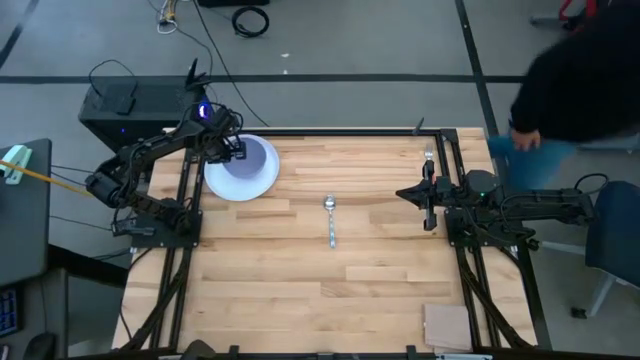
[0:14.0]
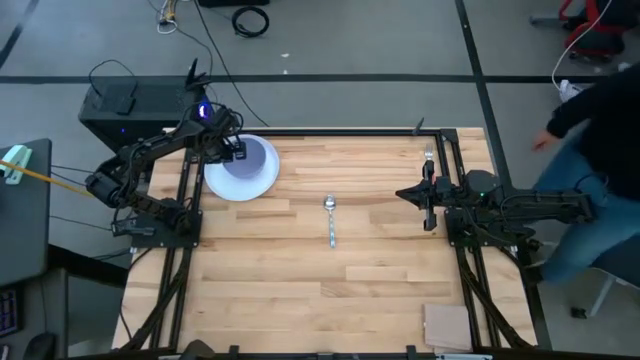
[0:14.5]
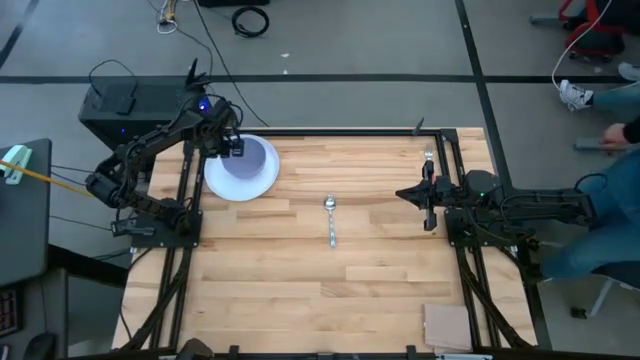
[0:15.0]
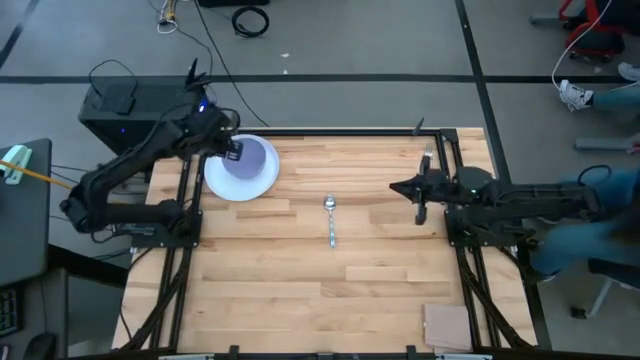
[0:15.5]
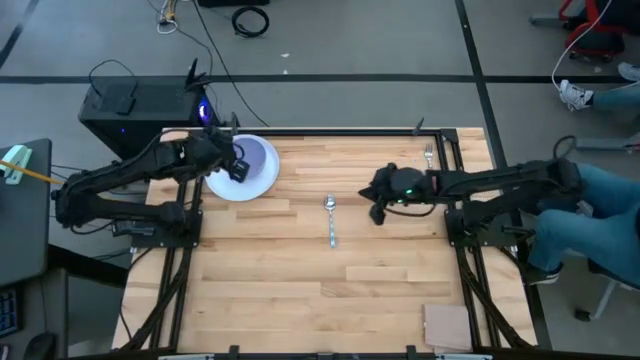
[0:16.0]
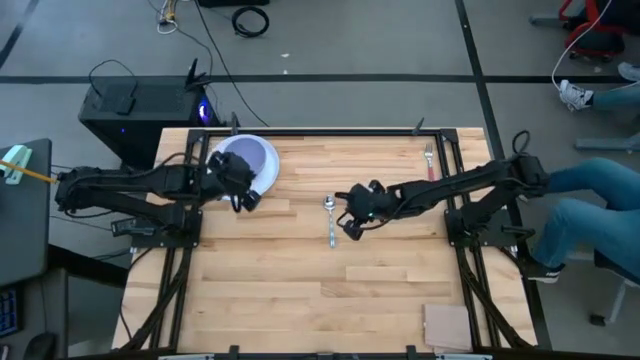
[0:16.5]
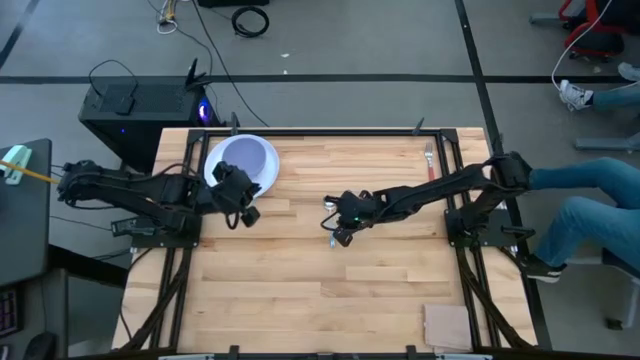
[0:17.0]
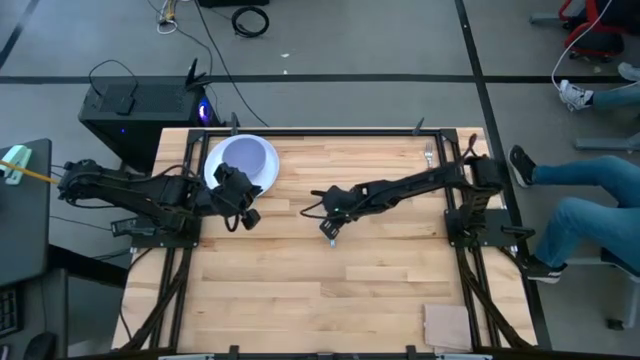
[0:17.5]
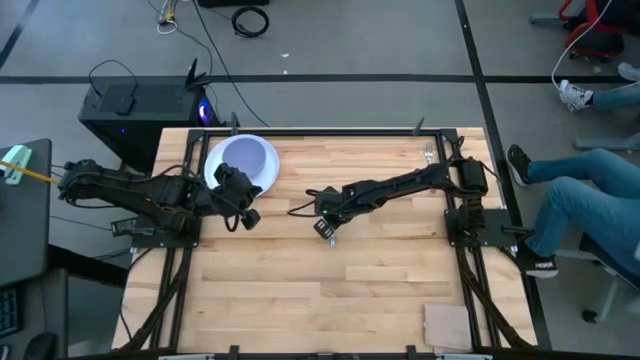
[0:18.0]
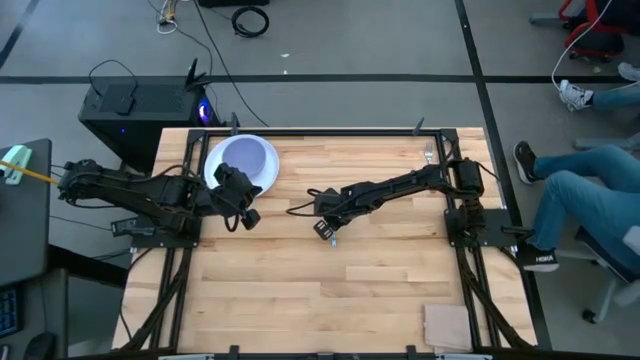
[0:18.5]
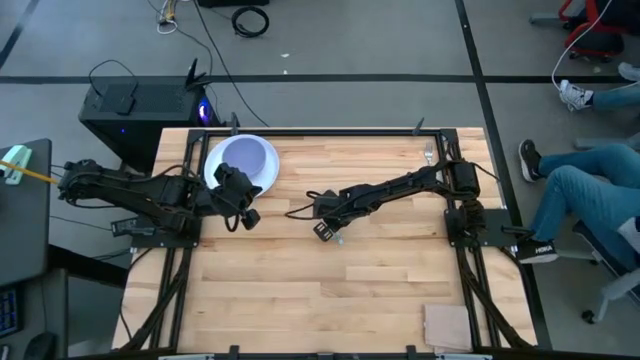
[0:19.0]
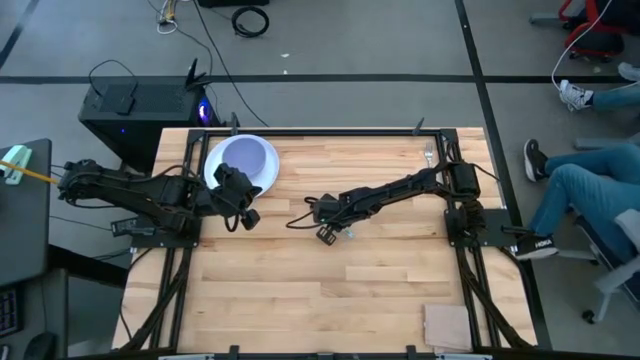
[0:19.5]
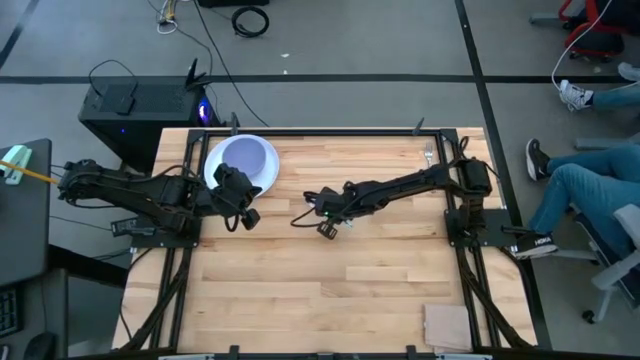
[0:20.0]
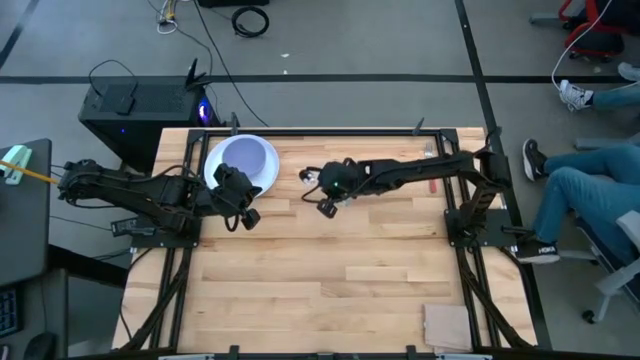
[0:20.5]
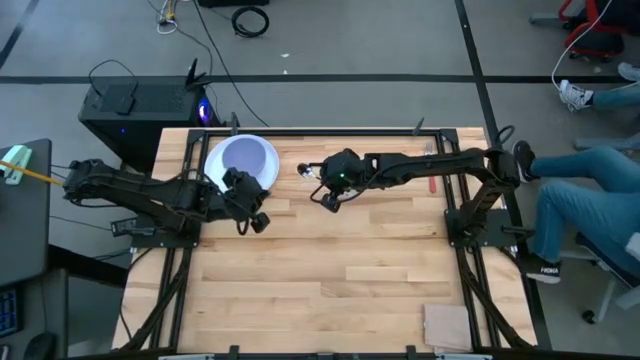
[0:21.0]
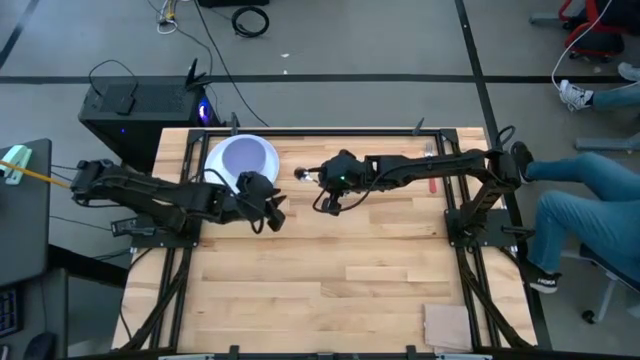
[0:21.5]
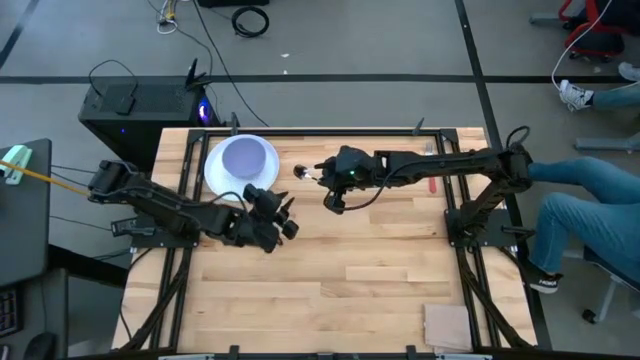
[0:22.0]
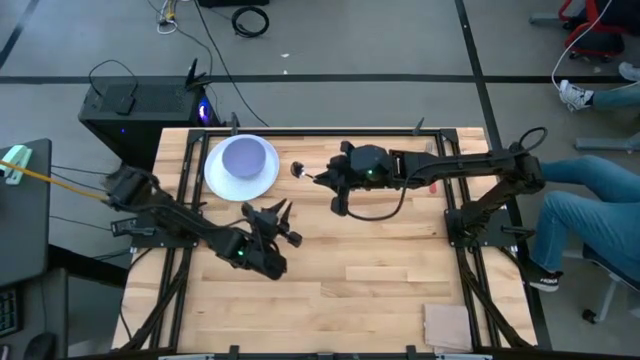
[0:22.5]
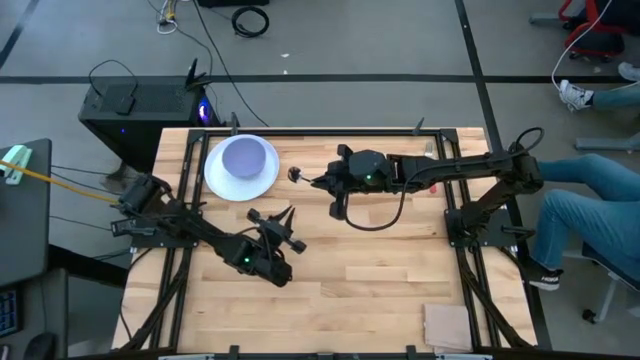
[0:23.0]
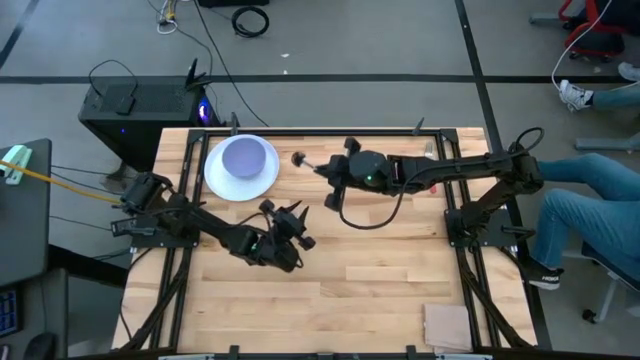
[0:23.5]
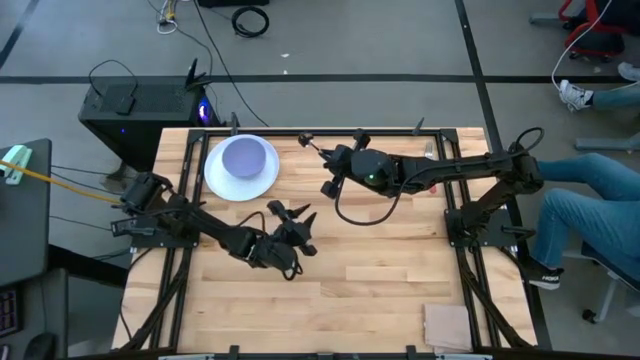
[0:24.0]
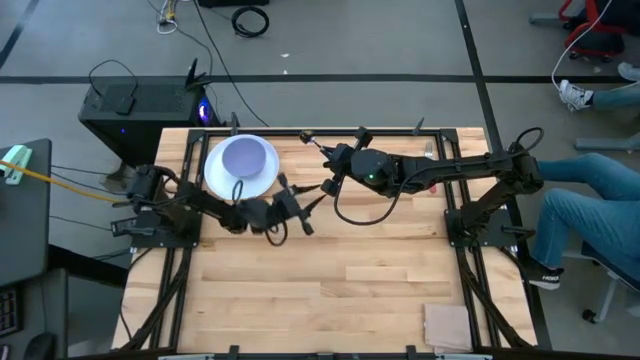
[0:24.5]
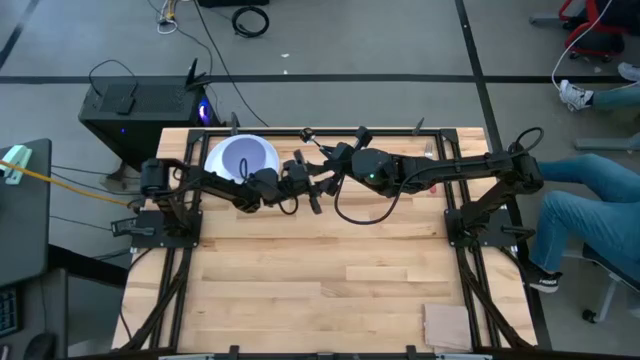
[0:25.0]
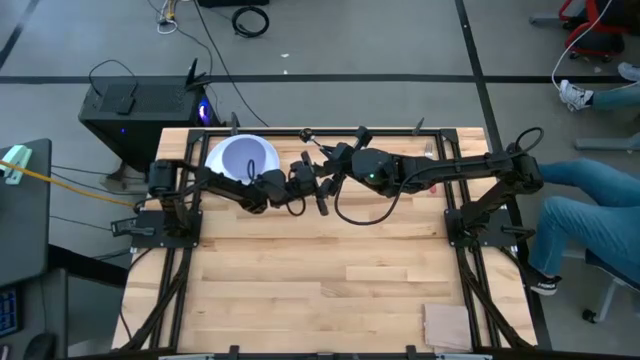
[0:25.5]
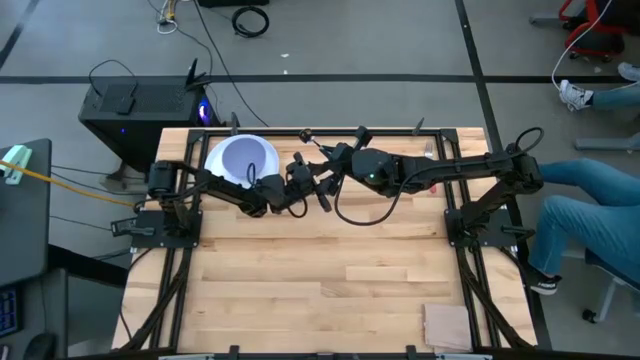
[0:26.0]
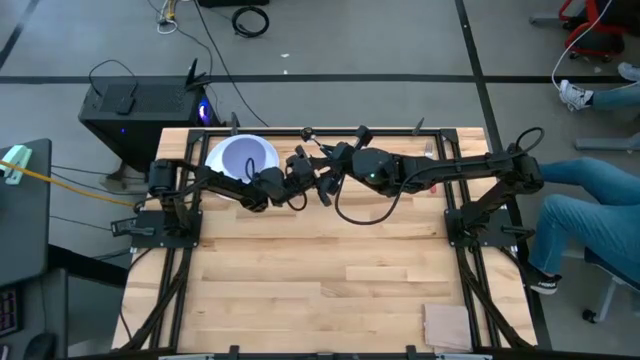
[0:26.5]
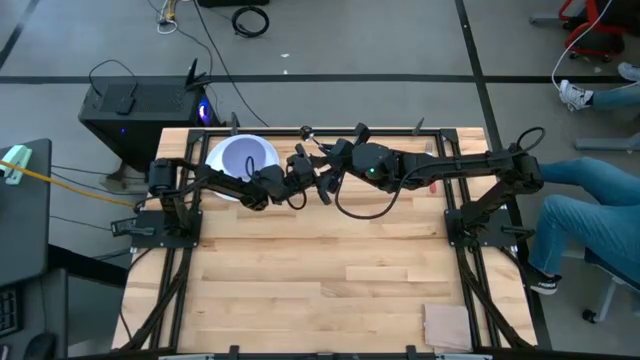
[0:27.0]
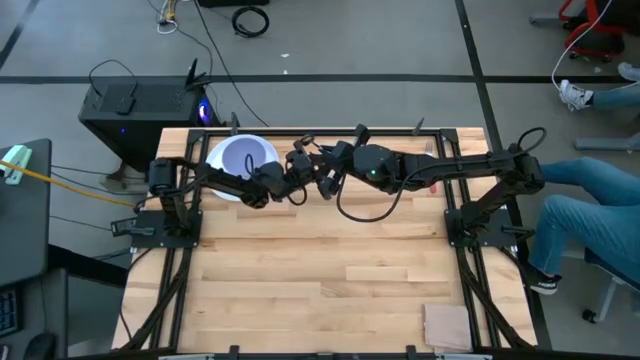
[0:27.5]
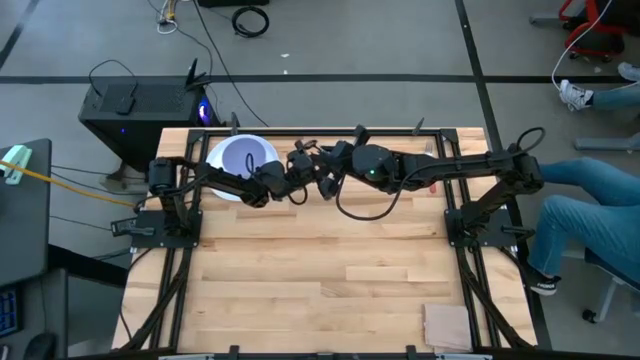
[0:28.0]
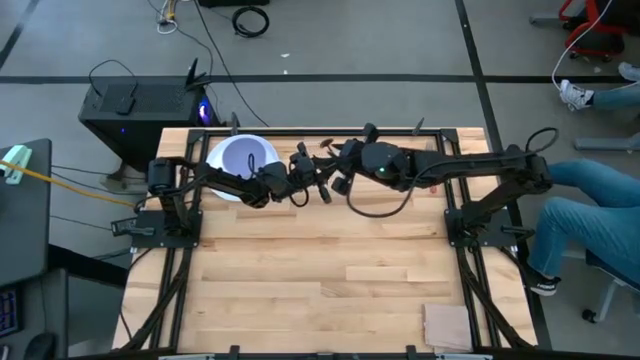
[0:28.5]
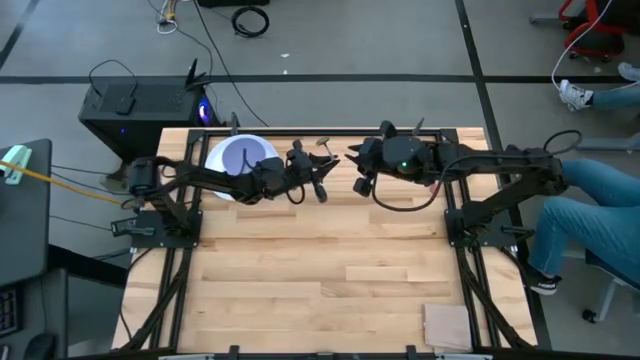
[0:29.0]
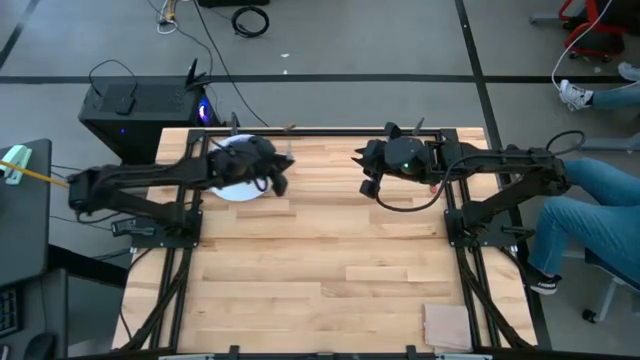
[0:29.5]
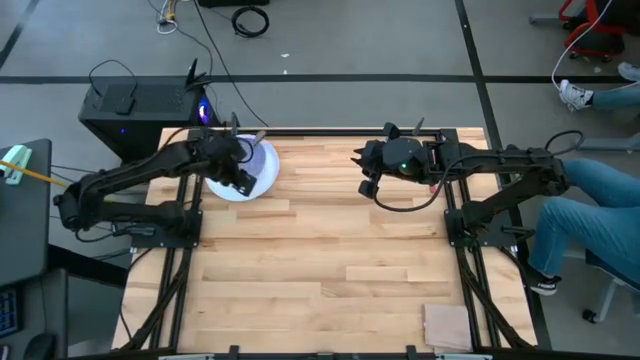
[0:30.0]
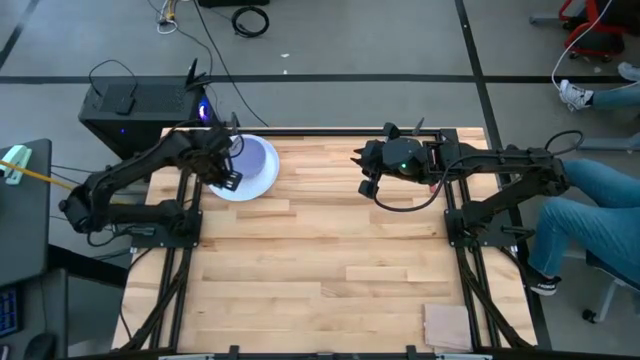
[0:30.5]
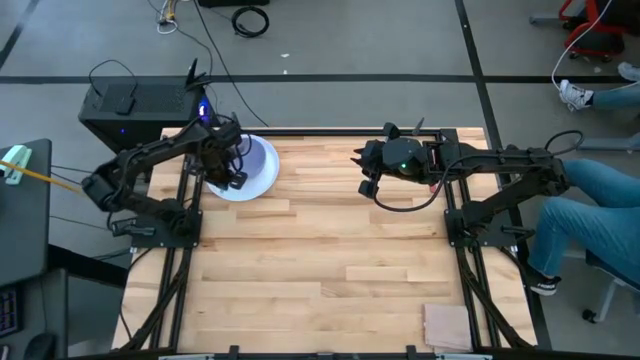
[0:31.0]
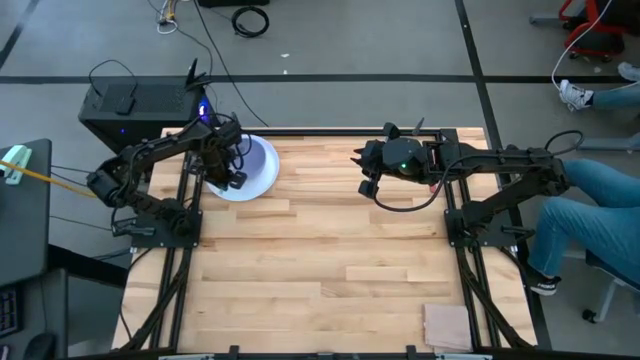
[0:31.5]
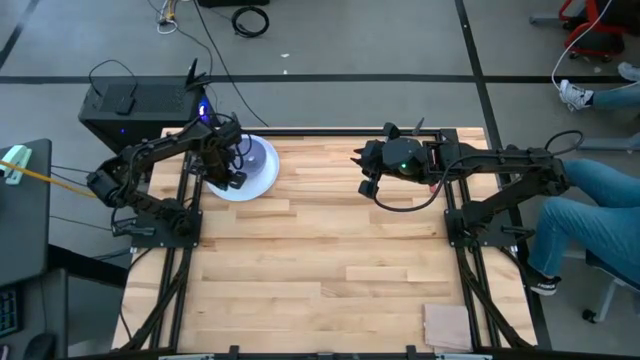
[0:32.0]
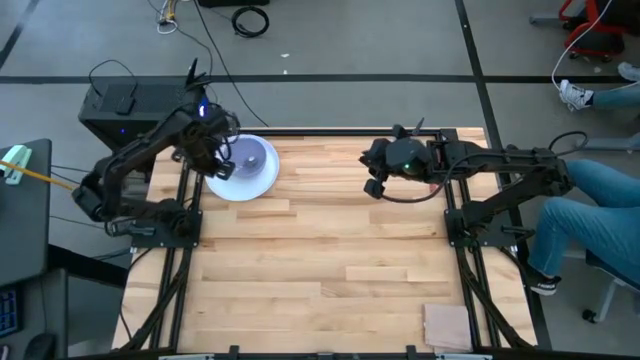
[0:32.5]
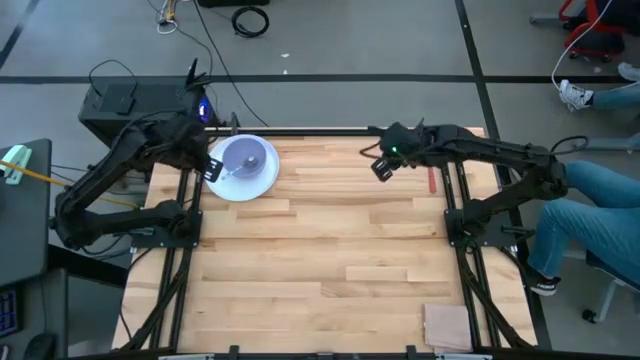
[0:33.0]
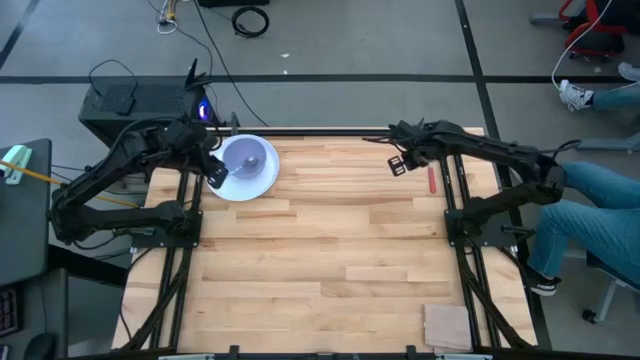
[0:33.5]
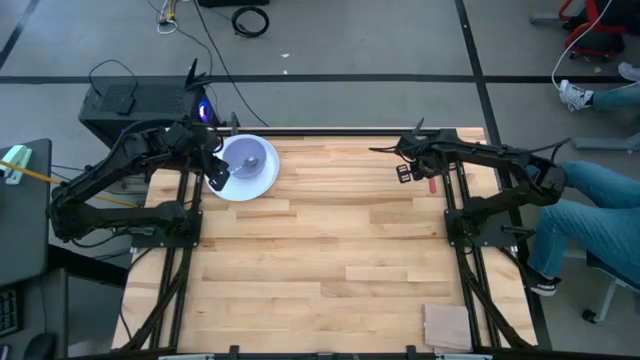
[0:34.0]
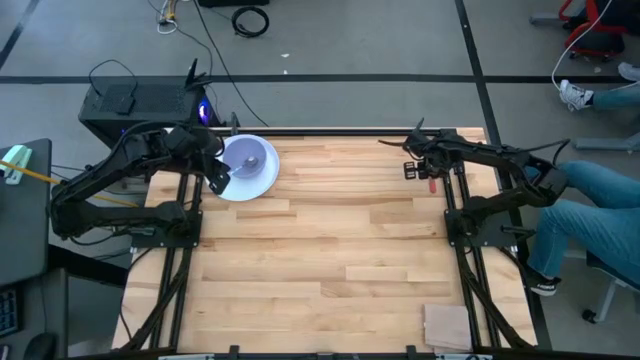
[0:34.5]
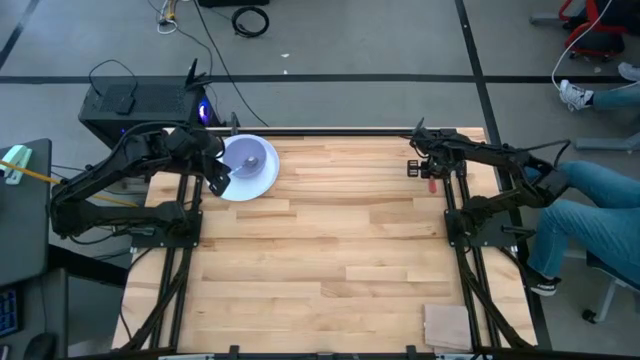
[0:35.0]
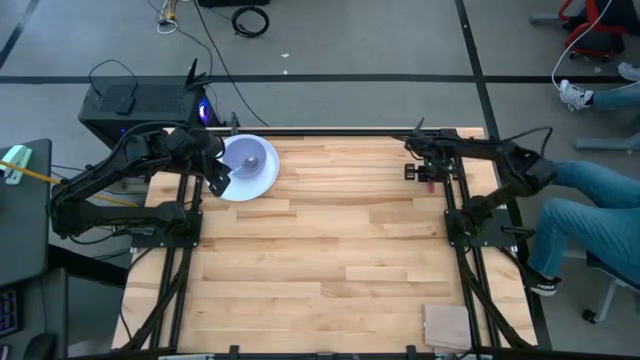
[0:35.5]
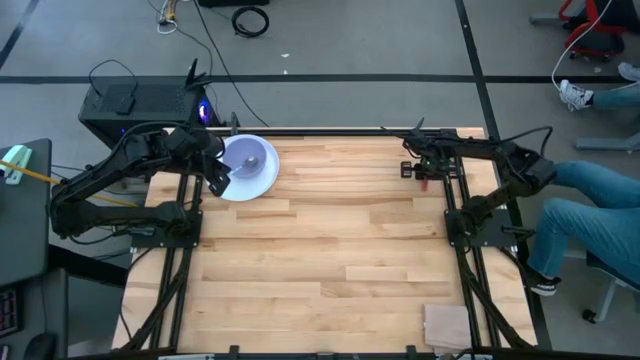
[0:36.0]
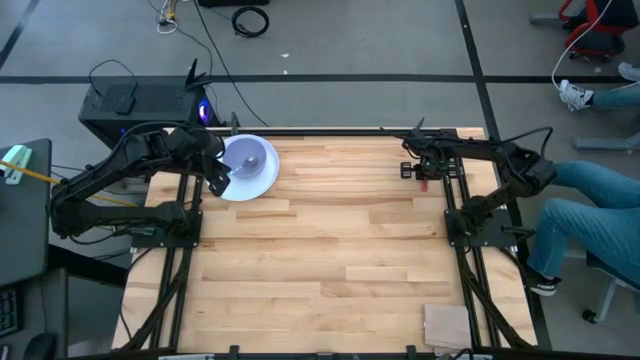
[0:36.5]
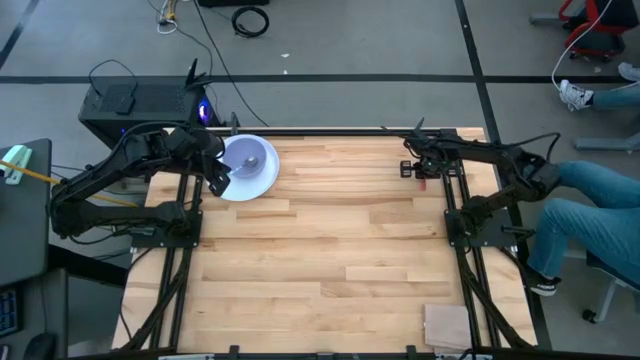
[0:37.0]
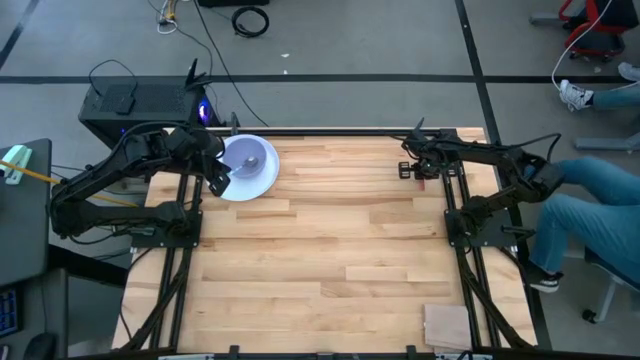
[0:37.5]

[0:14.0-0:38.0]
Task: Set table place
Put the silver spoon into the purple bowl
